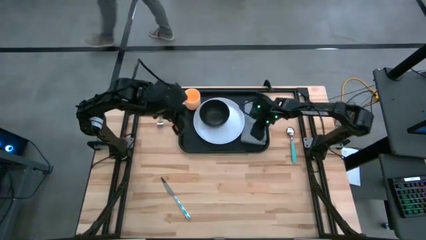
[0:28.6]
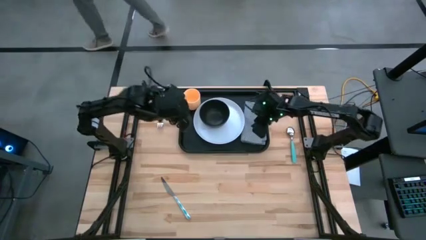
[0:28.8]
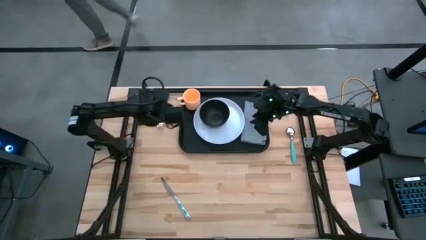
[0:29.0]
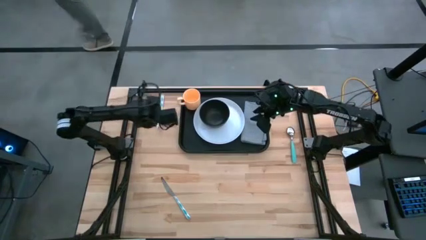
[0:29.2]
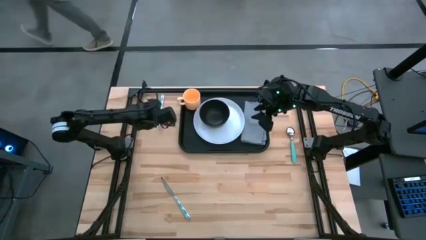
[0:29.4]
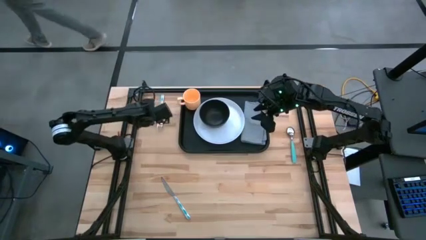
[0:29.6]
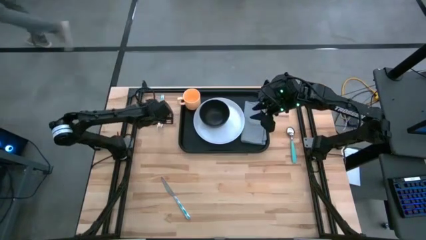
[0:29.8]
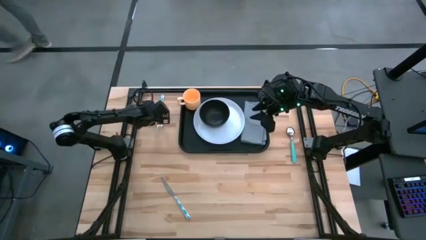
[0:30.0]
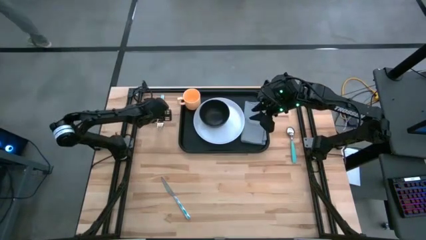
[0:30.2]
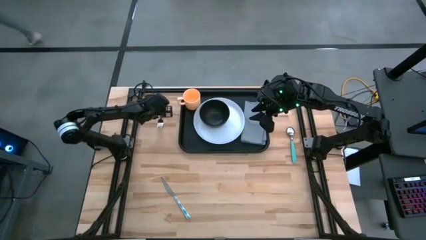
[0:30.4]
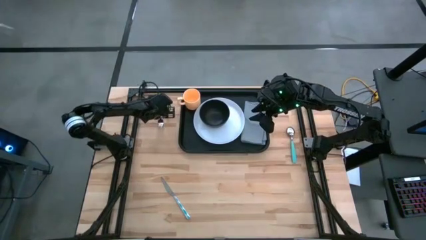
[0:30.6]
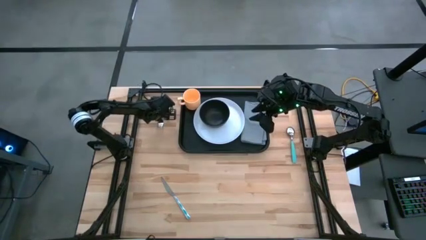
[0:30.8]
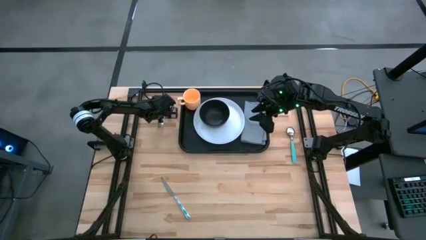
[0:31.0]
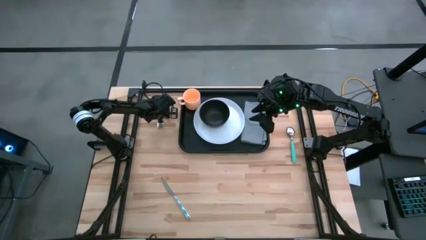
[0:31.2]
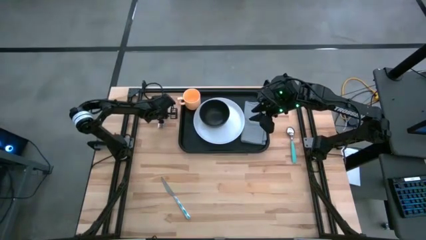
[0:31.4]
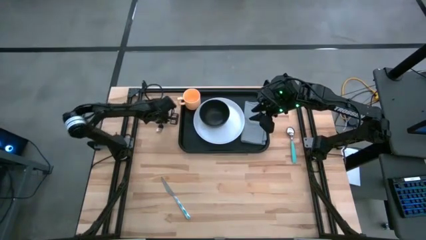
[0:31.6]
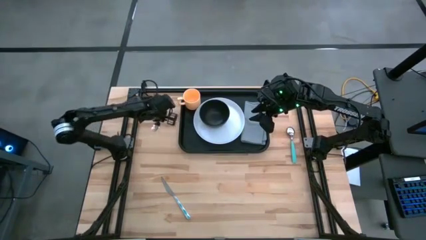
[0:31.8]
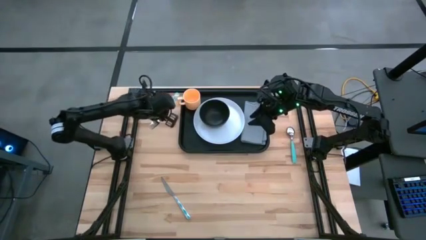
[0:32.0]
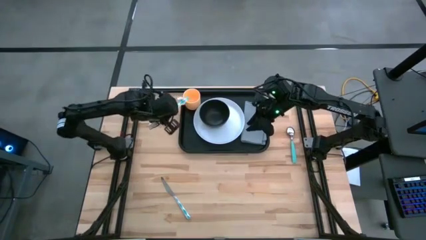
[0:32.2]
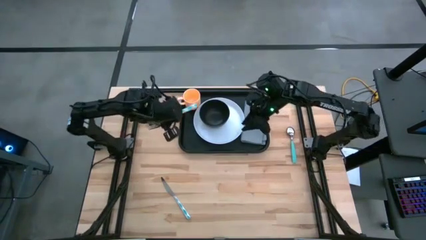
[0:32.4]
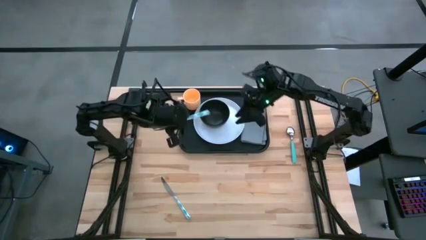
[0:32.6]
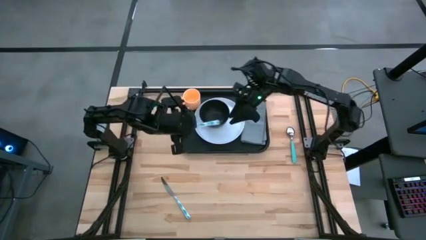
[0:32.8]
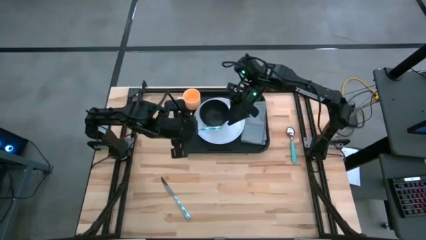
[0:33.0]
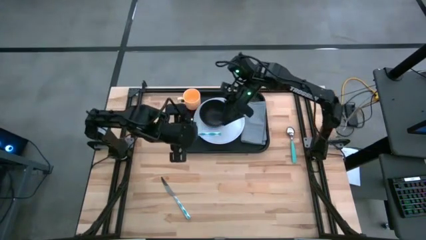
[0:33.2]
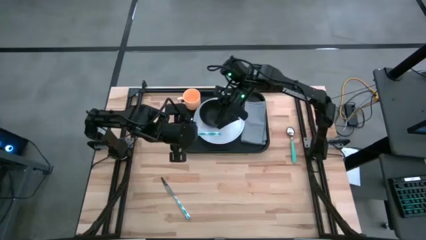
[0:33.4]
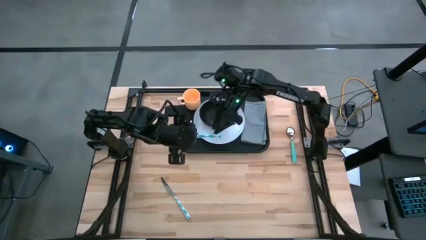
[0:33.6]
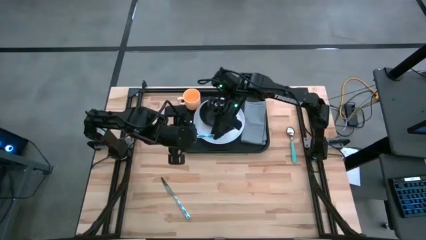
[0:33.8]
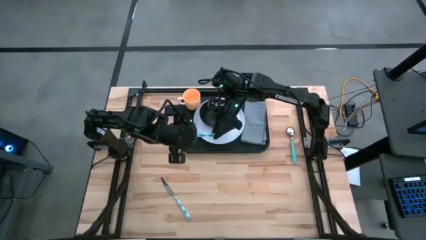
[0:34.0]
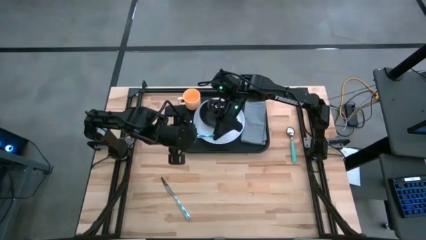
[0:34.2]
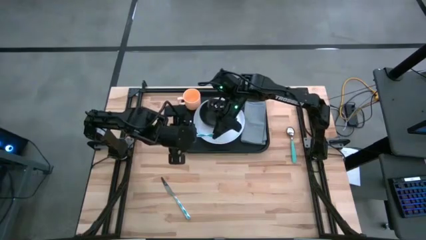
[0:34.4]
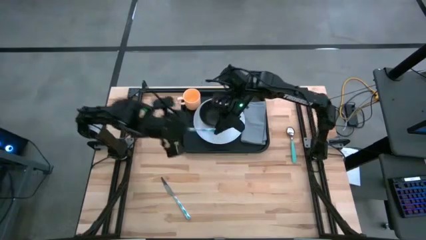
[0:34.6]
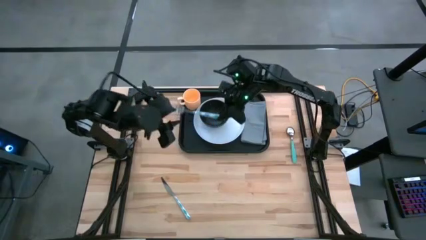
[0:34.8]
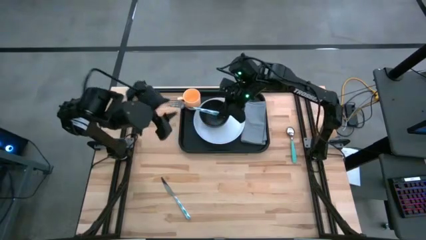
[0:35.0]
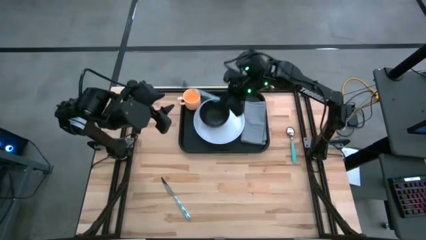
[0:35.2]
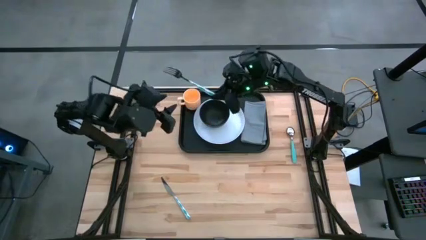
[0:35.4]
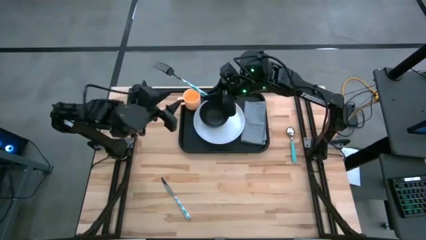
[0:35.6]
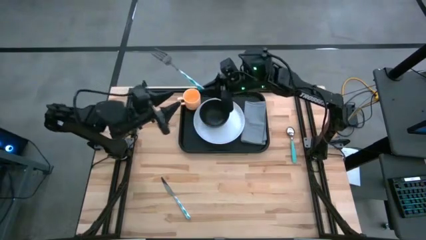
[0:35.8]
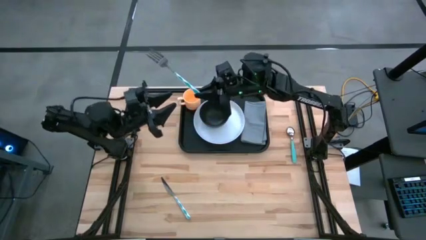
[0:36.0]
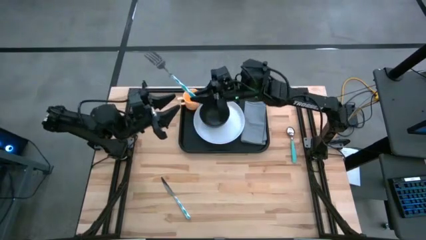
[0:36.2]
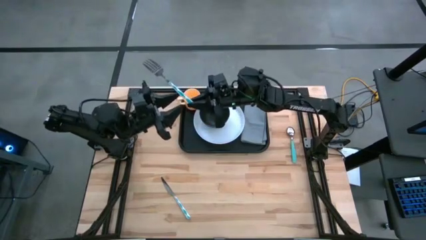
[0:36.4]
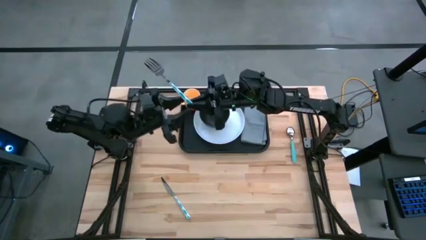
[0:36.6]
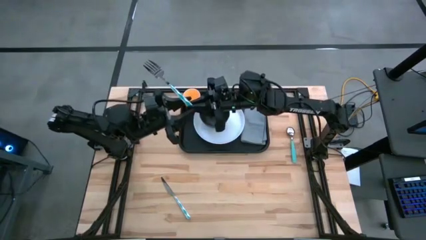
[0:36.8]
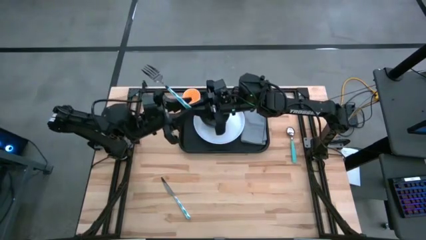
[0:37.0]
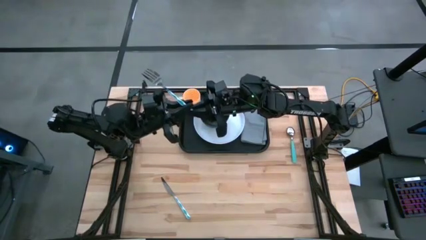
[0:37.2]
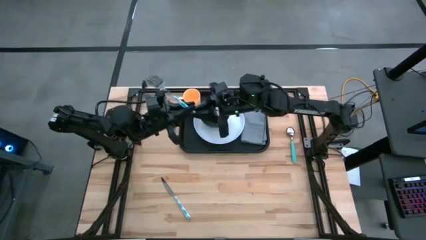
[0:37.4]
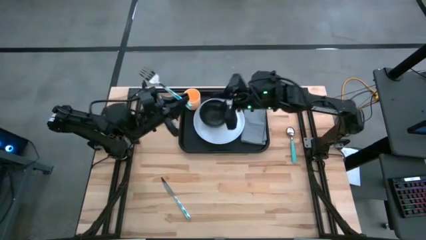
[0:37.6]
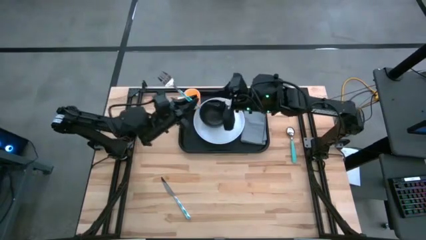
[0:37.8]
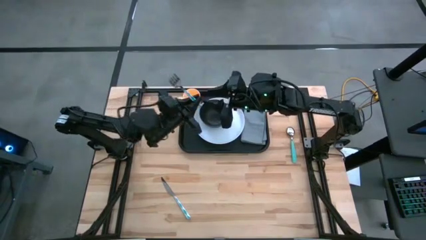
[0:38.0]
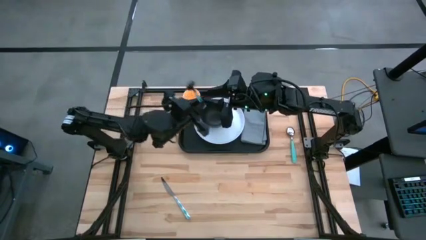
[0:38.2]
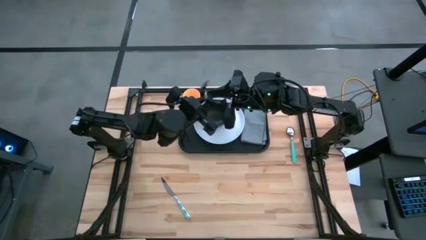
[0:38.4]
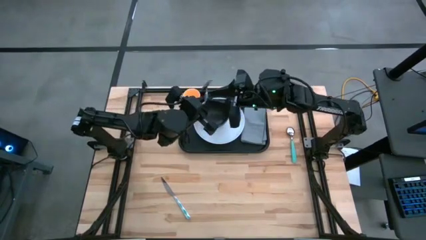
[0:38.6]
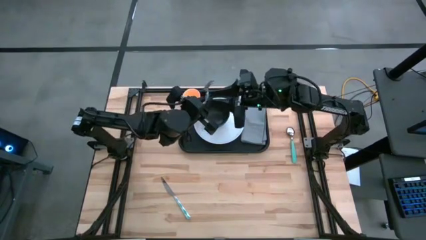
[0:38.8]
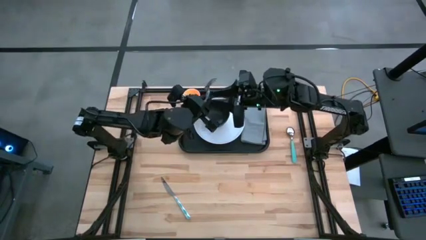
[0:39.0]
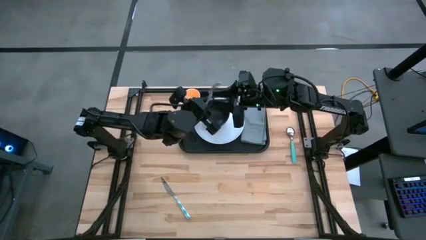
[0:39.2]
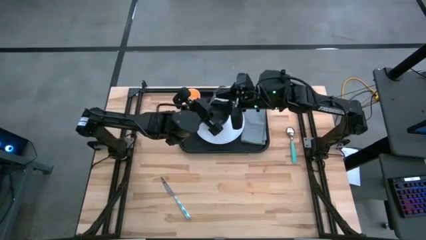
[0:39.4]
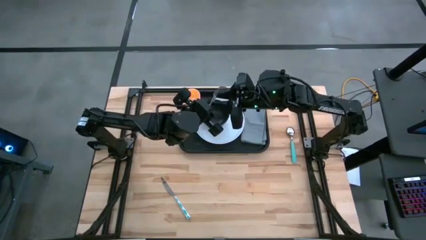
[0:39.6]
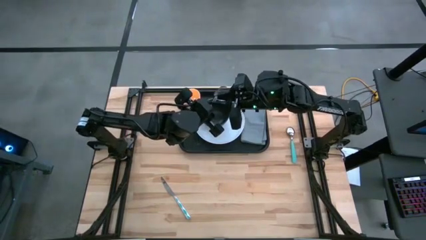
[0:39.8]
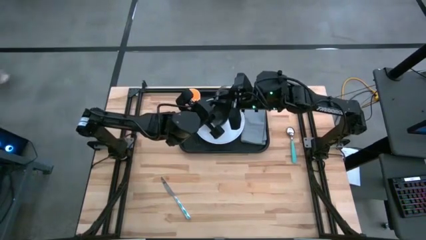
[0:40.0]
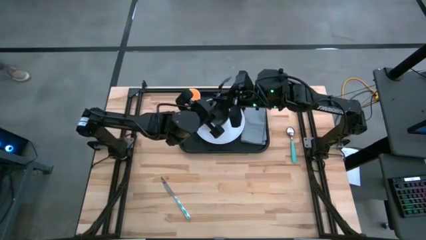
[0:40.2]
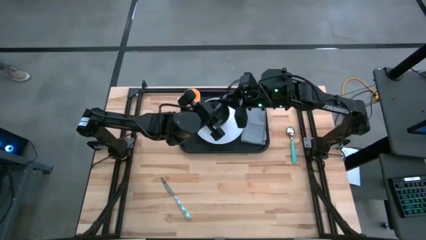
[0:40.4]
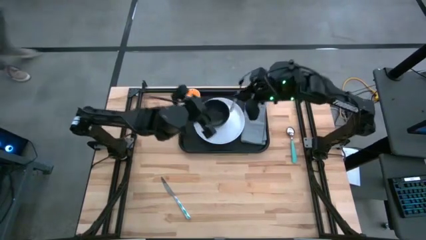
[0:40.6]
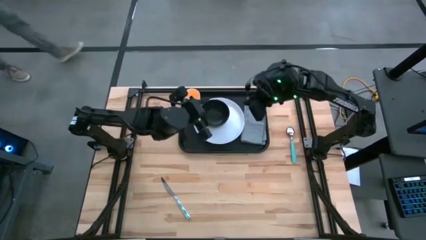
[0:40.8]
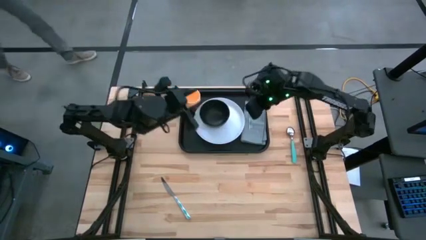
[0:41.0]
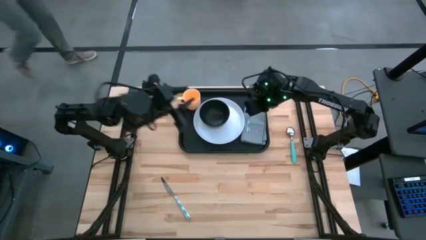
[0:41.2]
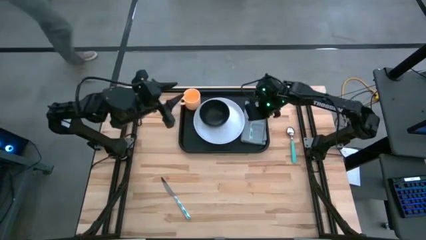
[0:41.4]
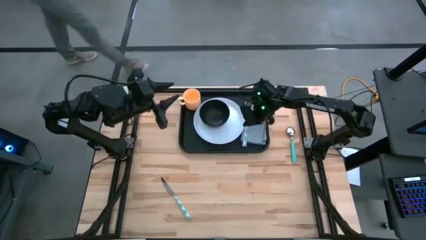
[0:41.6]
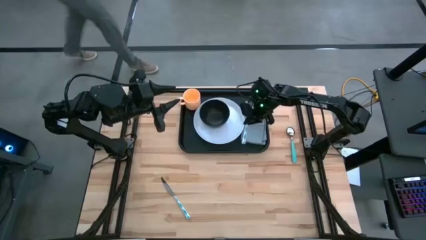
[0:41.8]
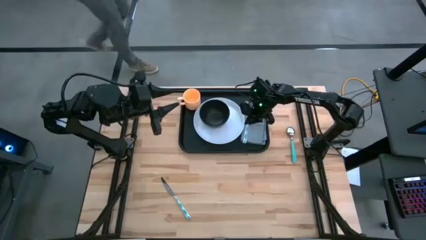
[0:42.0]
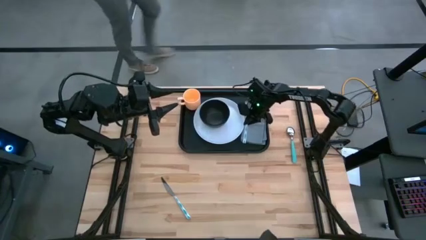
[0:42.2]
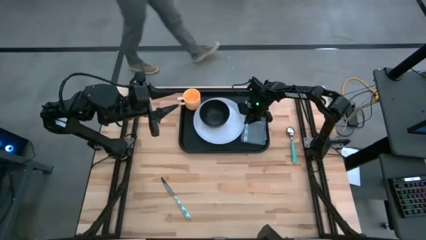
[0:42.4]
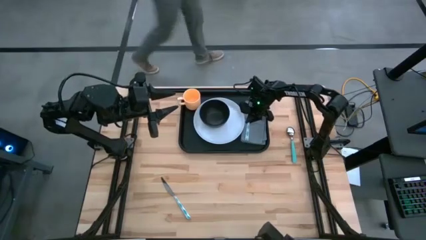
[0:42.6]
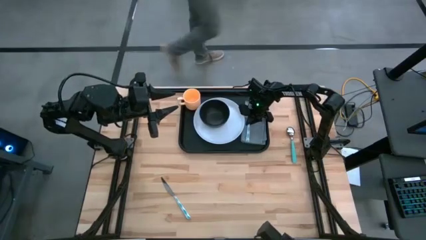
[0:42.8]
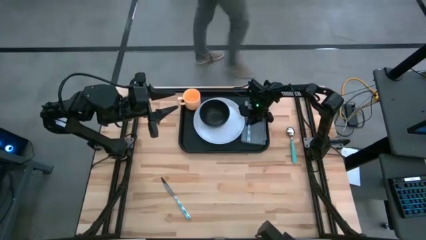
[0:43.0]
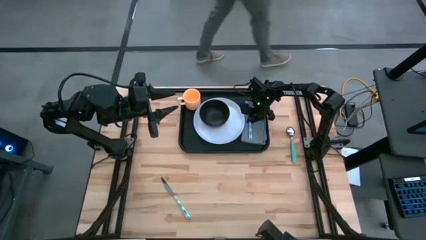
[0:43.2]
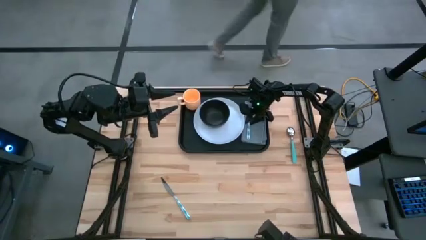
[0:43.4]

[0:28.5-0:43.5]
Task: Set up tray
Put the blue fork on top of the gray napkin on the black tray

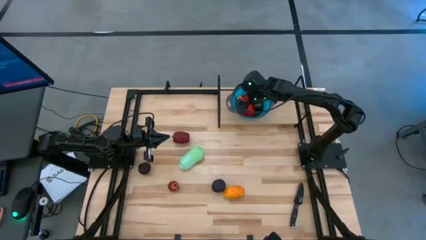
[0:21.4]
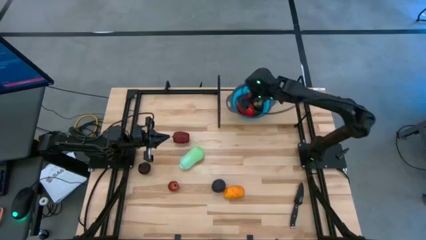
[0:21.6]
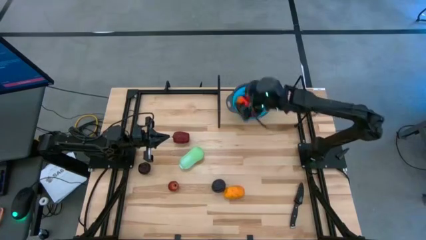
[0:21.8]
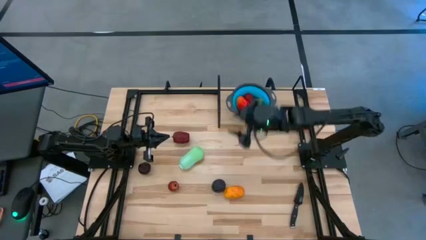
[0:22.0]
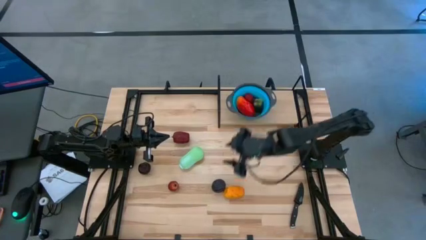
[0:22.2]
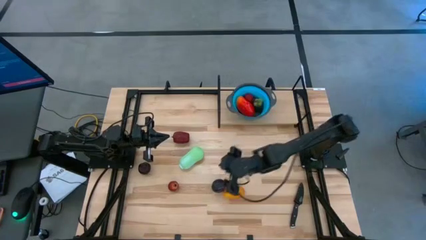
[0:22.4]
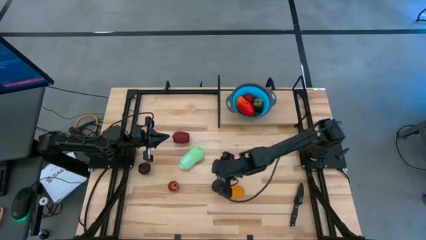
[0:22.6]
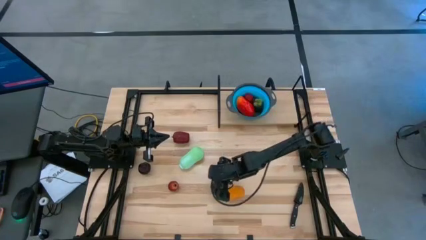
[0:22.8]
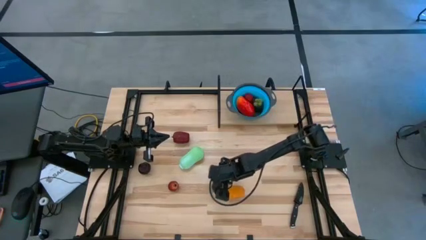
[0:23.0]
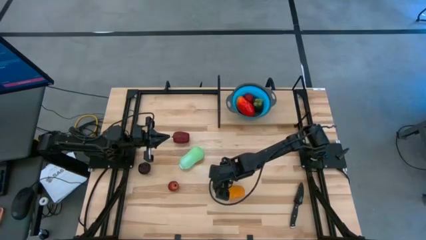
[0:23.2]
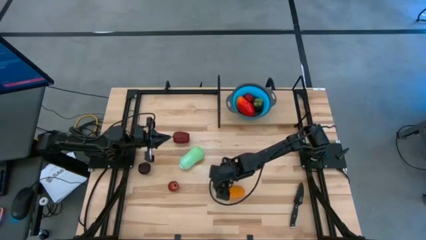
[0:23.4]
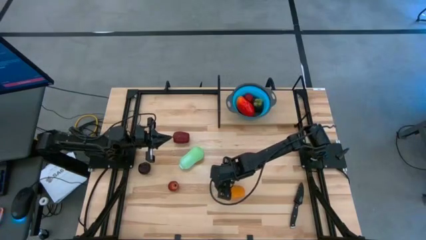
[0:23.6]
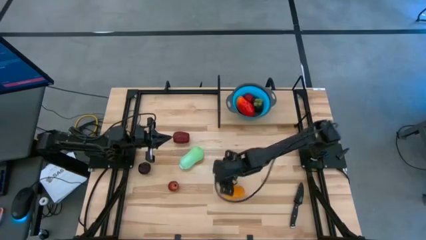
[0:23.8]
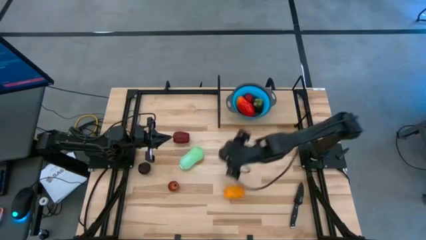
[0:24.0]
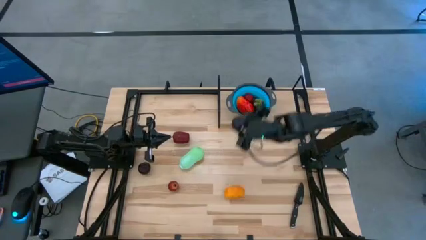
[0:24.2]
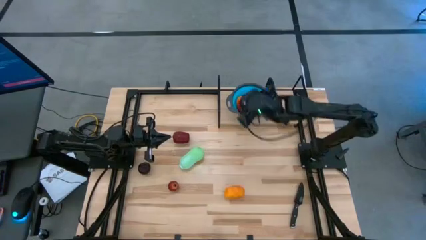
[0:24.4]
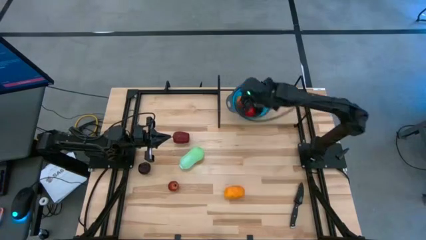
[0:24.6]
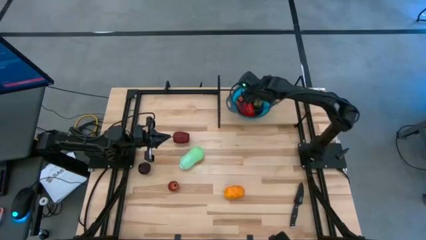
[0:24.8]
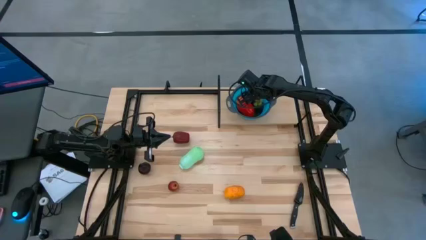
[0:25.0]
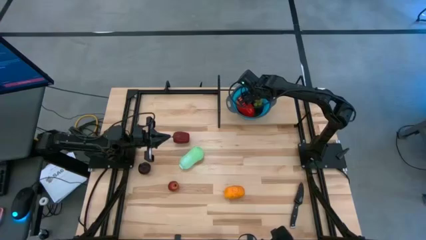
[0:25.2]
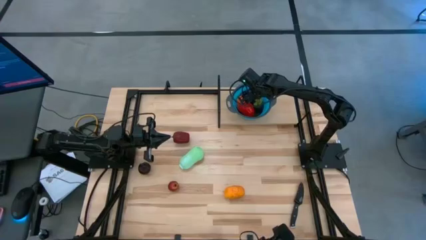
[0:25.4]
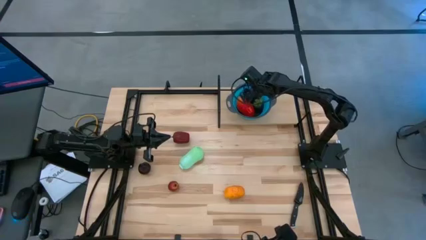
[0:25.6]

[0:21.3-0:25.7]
Task: Pick & Place Fruit
Put the bottom black plum into the blue strainer bowl on the shelf
